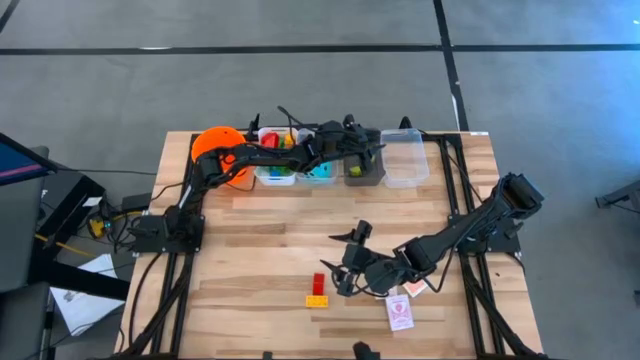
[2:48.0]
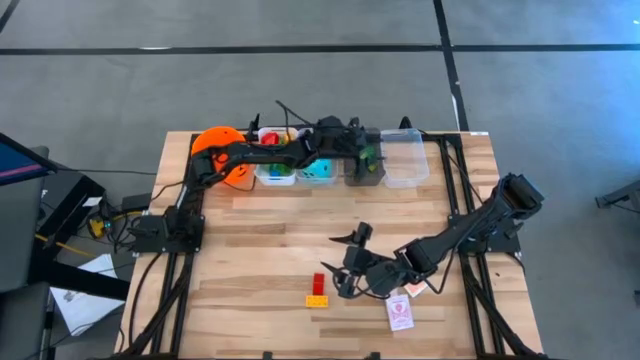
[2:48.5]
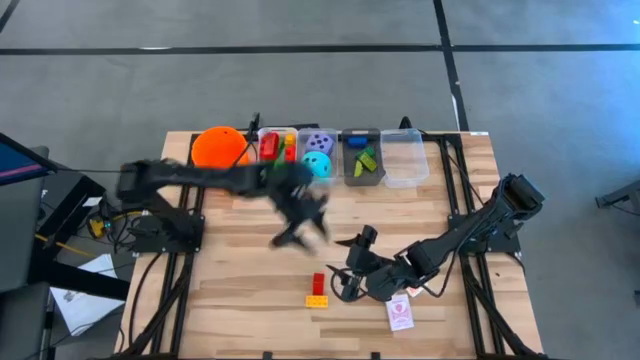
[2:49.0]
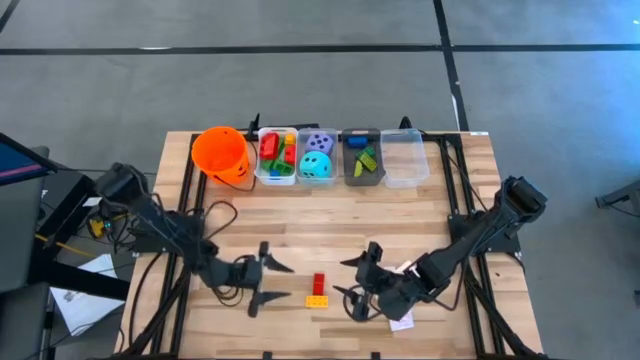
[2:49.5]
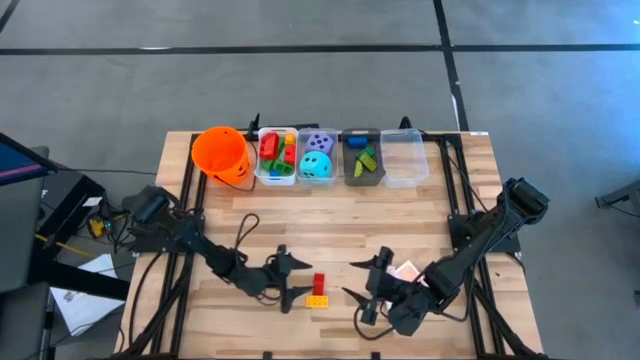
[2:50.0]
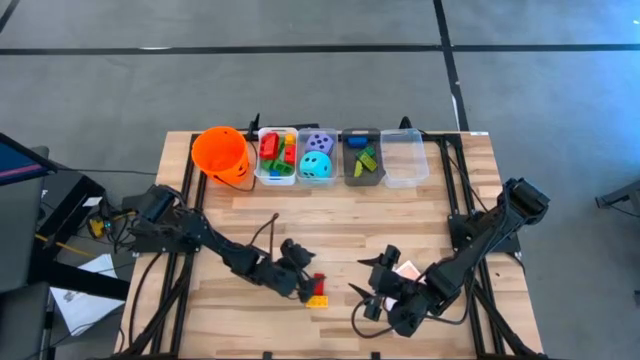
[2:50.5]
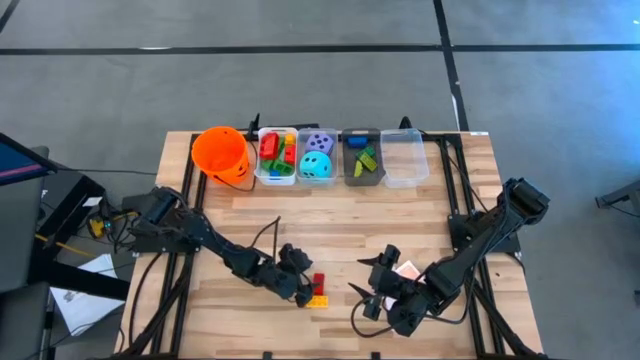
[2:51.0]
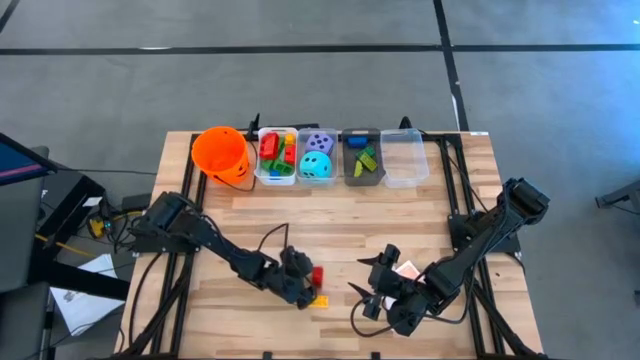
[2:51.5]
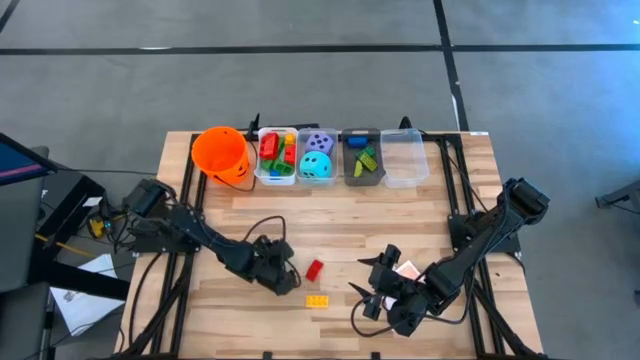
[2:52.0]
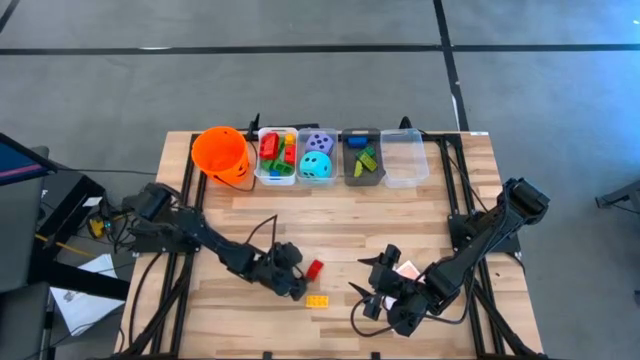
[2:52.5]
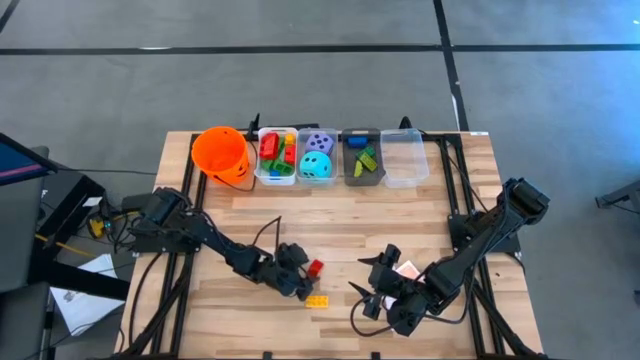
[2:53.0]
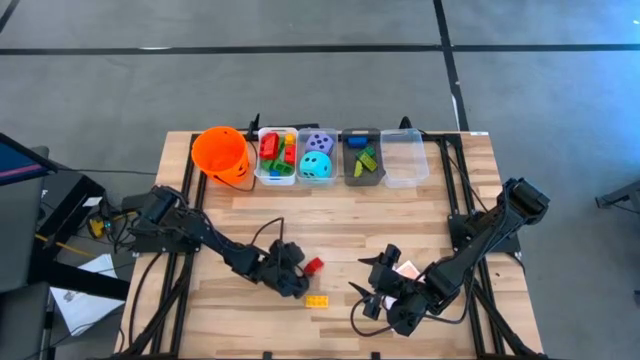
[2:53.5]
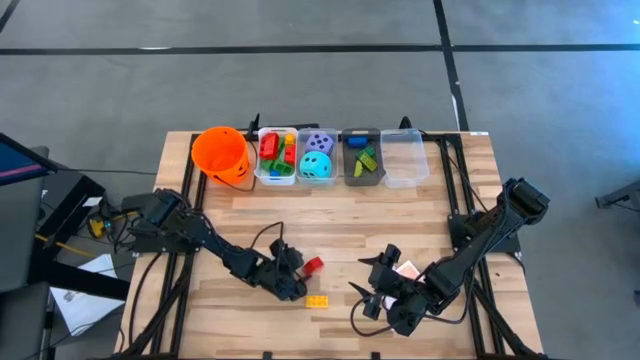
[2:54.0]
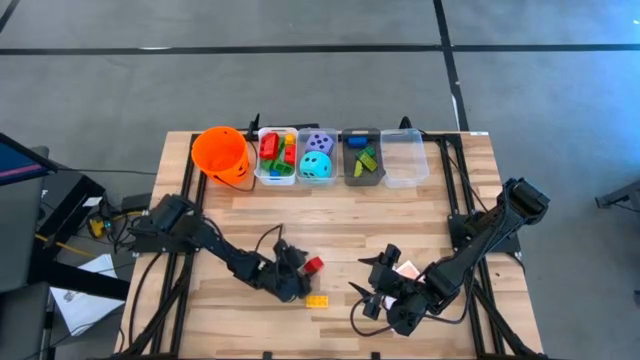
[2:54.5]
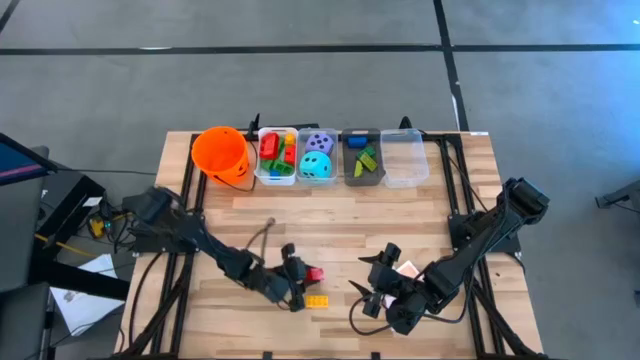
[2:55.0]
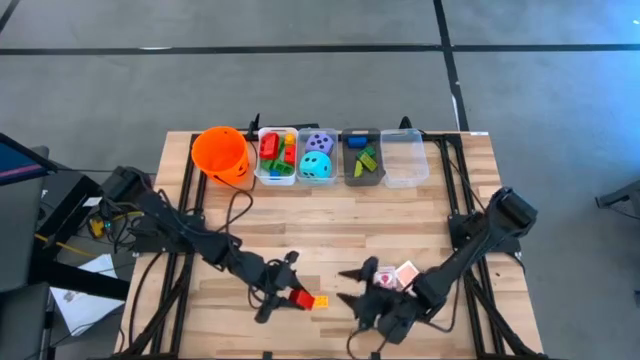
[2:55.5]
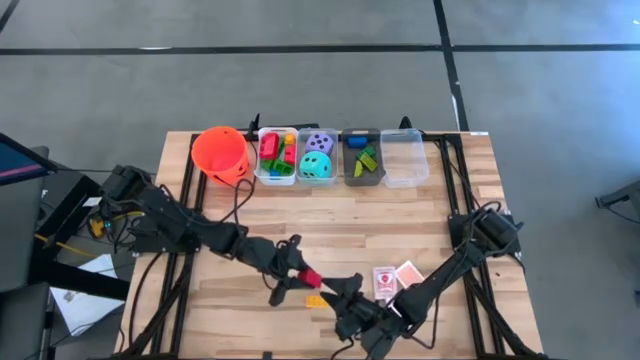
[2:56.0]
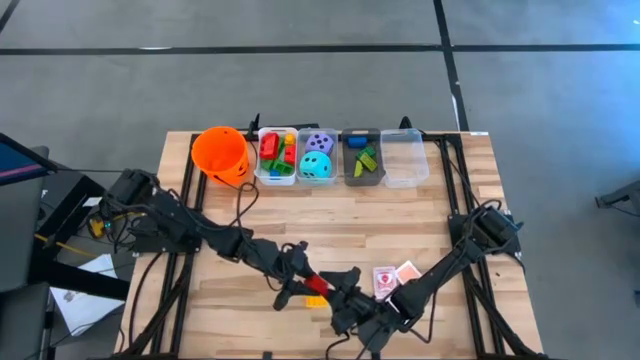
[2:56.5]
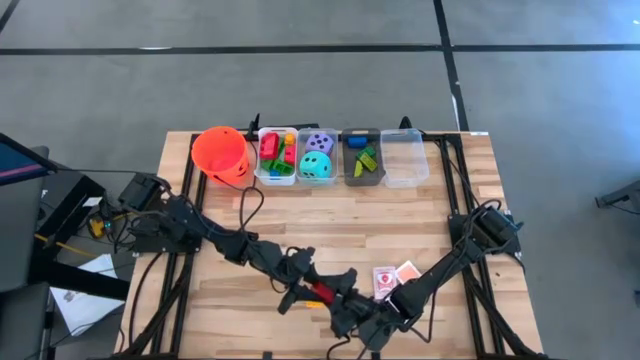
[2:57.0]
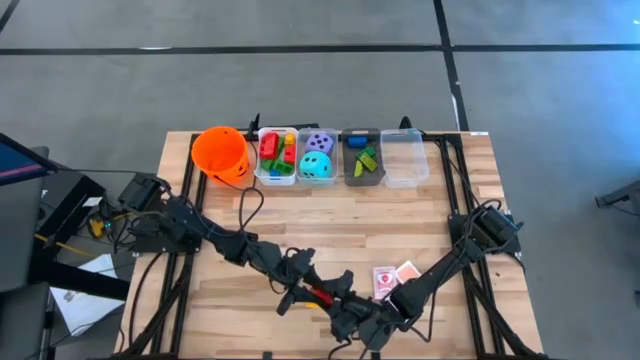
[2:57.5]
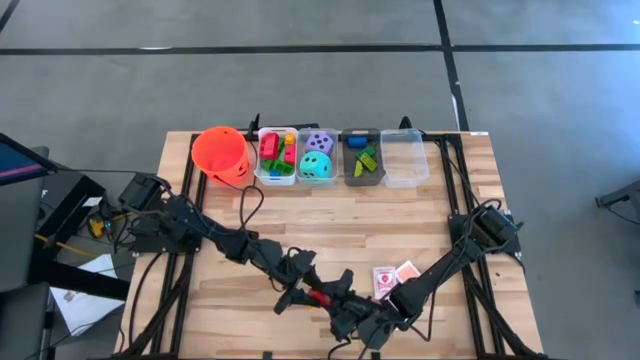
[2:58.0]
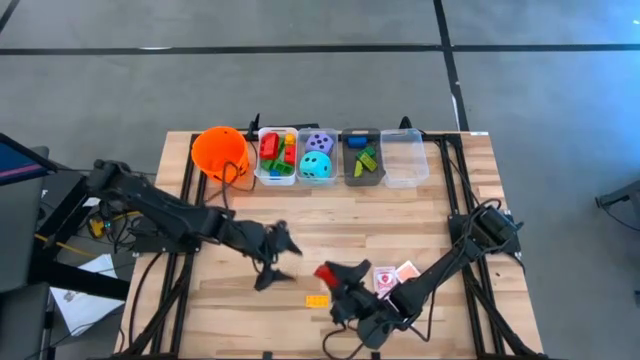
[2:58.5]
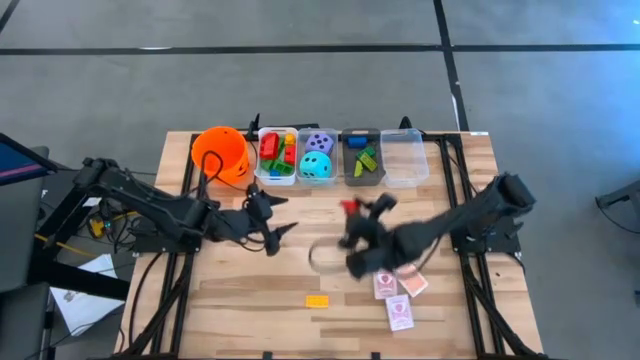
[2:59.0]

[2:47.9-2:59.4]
Task: Pick & Place Toys
Put the triangle red game piece into the black bin

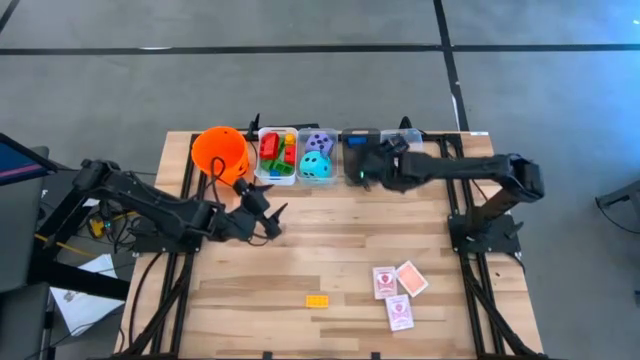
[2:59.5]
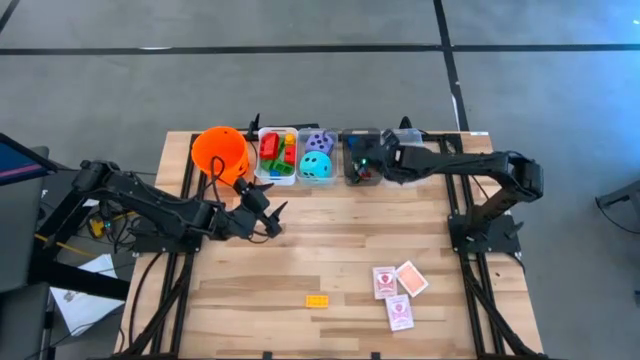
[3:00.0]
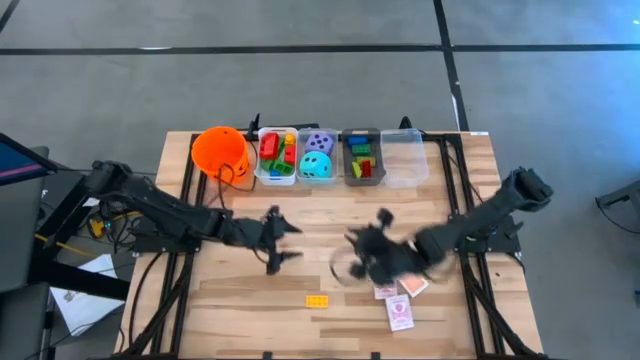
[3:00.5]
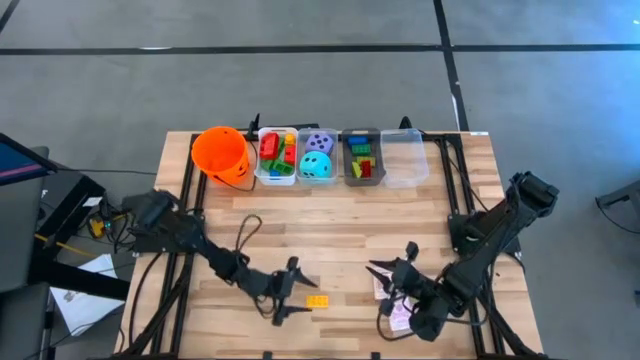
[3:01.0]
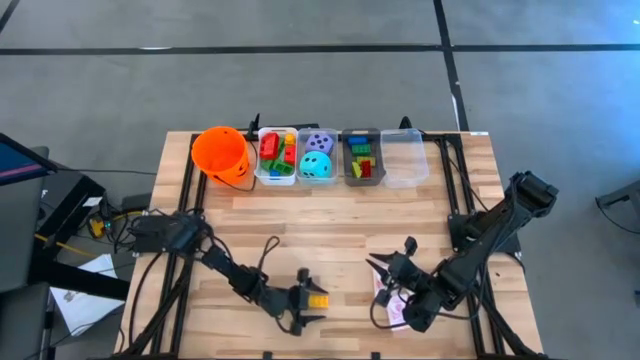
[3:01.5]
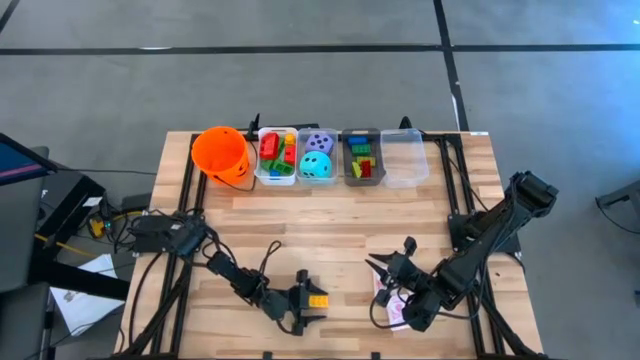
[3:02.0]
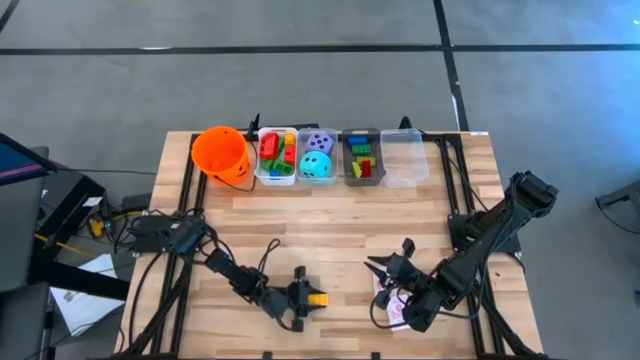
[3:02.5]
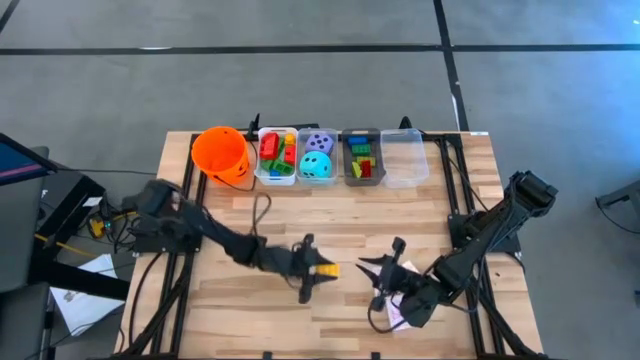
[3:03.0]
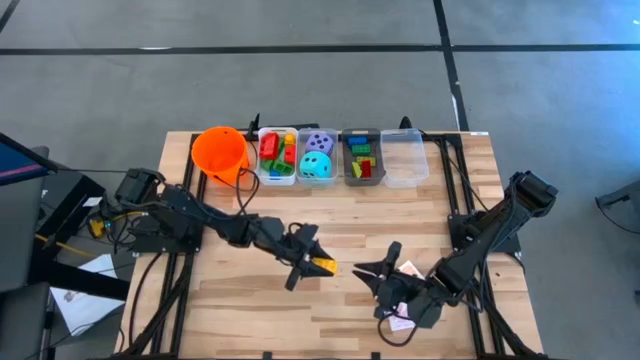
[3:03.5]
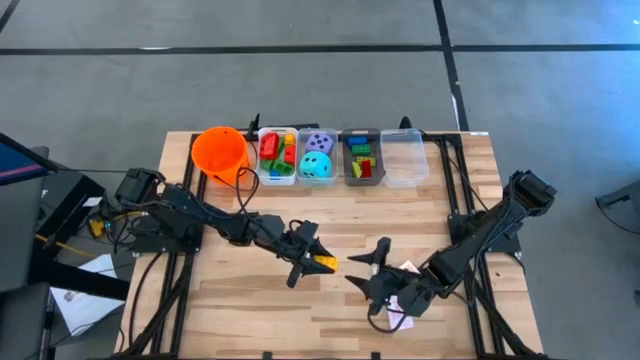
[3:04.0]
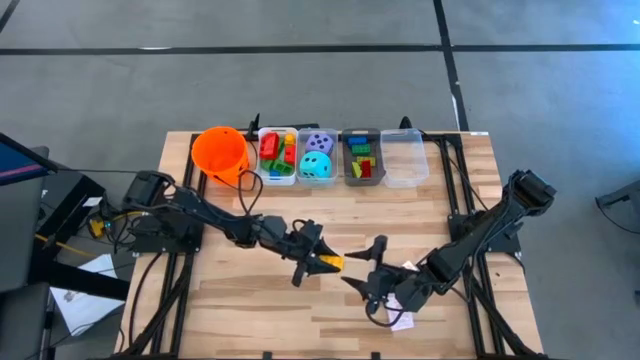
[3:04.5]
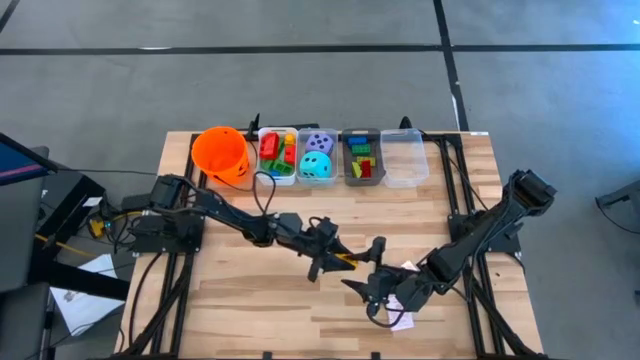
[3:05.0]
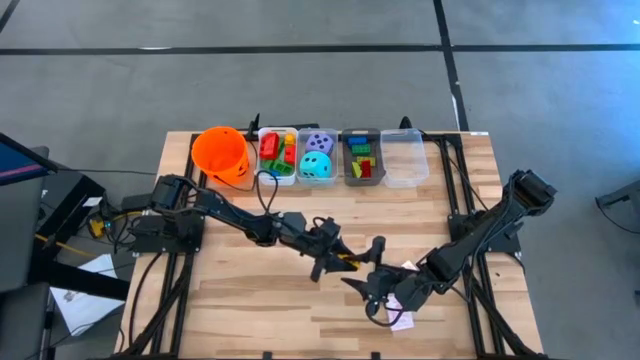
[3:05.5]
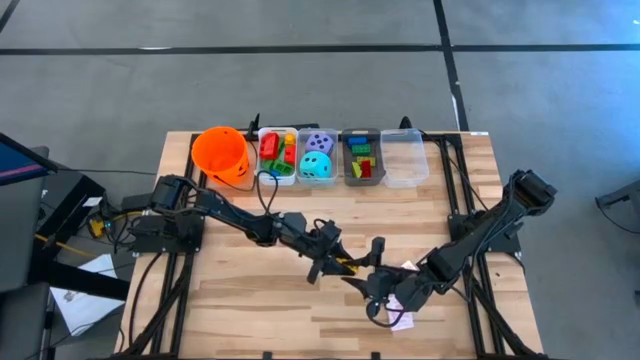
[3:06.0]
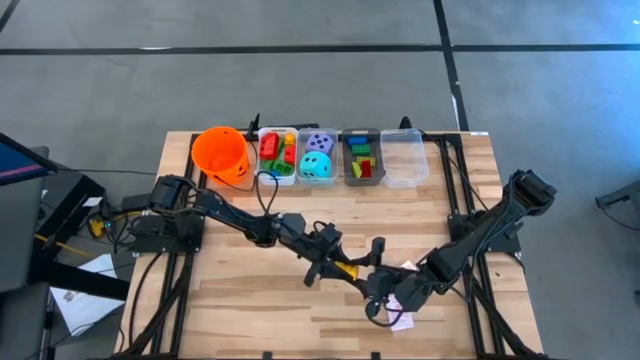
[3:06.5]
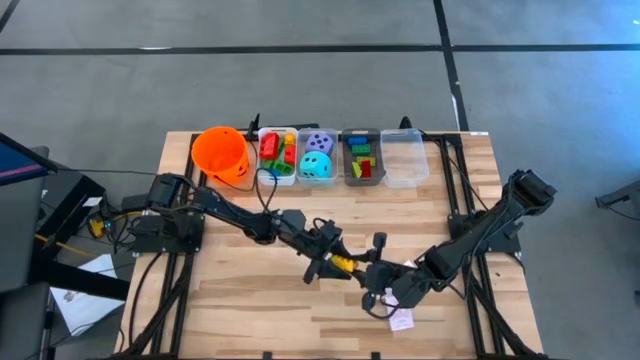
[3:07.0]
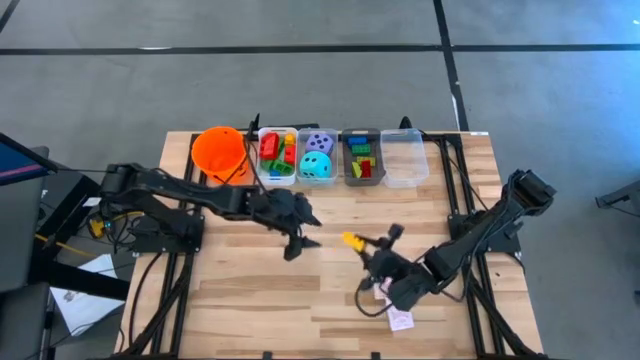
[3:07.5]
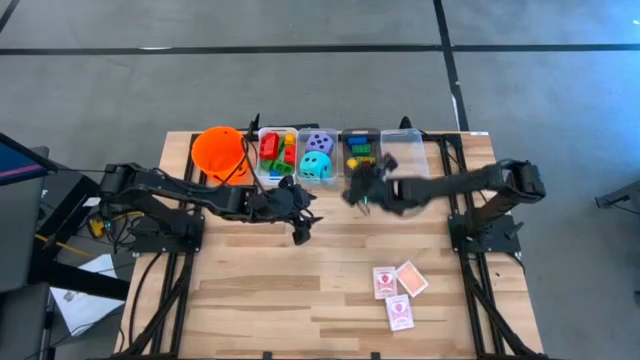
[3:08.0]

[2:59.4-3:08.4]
Put the small yellow game piece into the black bin
